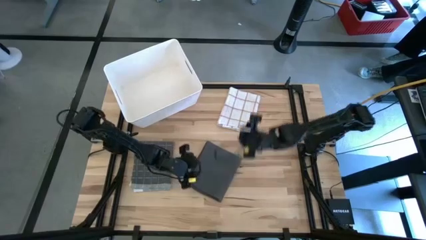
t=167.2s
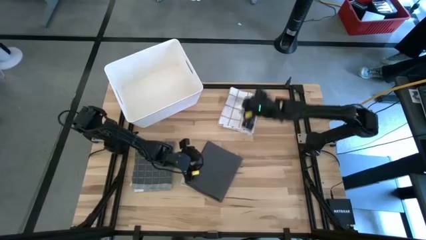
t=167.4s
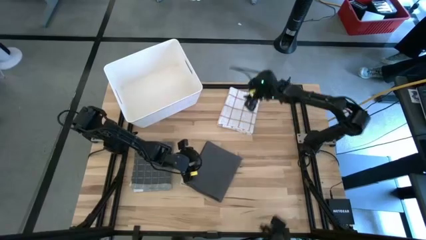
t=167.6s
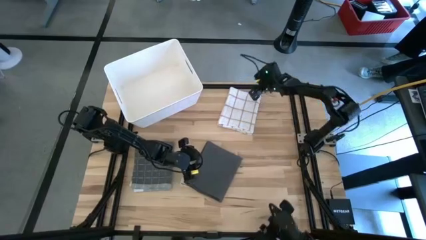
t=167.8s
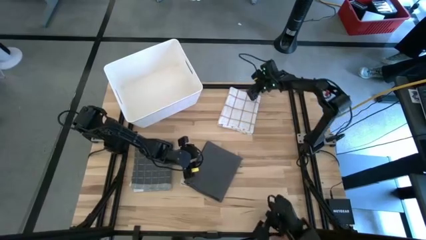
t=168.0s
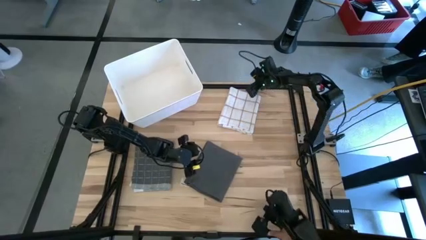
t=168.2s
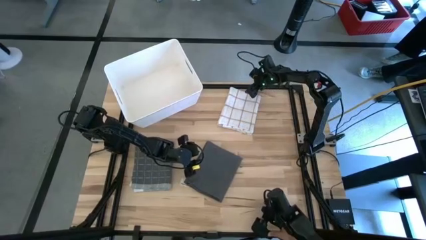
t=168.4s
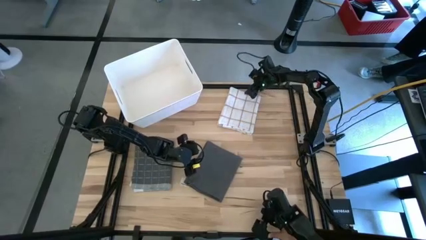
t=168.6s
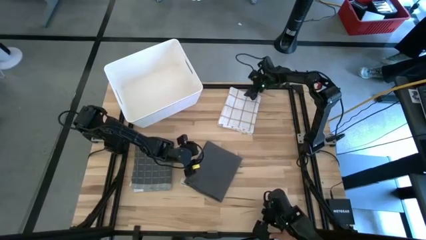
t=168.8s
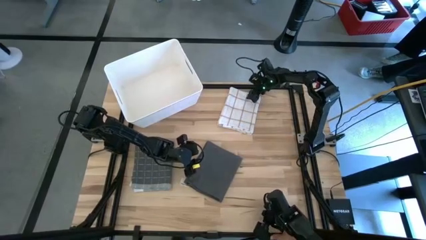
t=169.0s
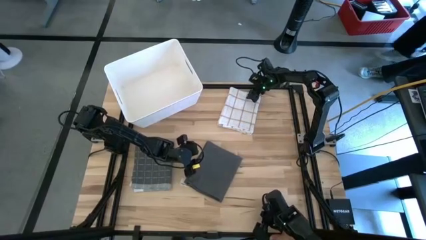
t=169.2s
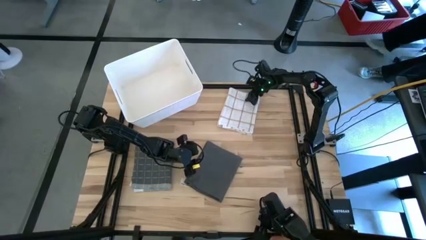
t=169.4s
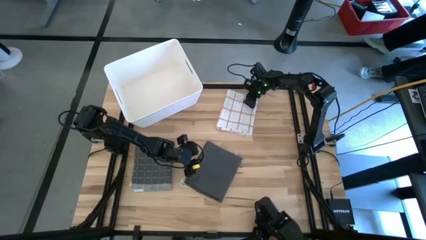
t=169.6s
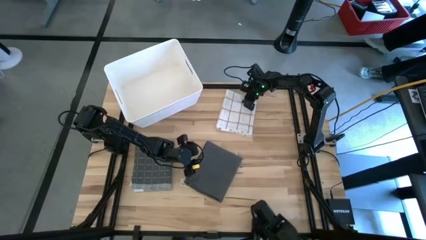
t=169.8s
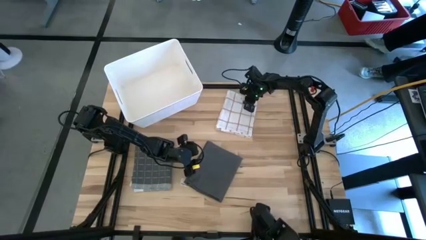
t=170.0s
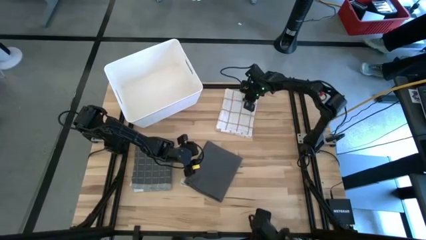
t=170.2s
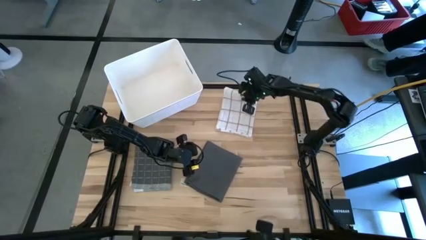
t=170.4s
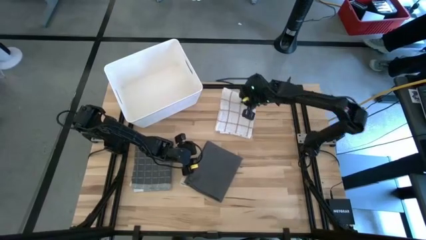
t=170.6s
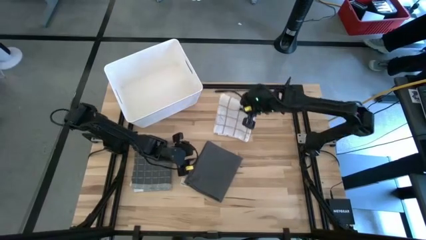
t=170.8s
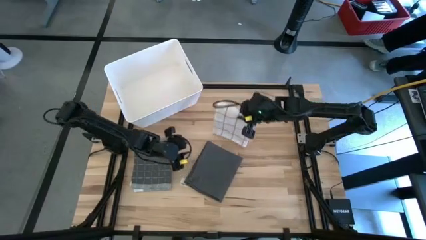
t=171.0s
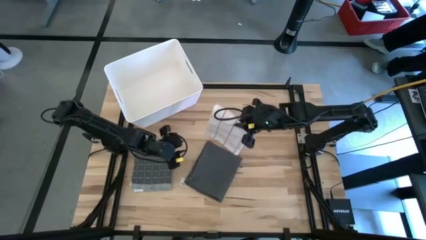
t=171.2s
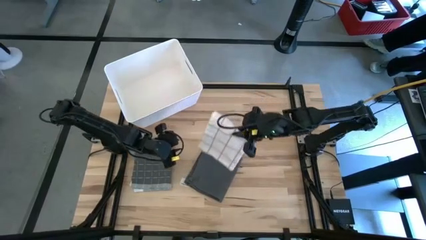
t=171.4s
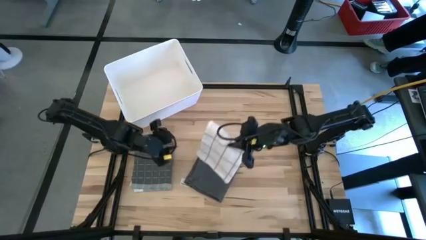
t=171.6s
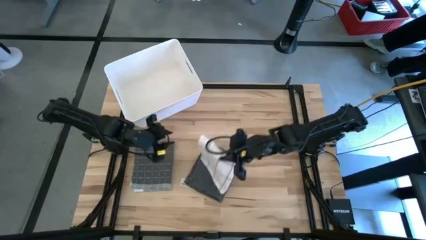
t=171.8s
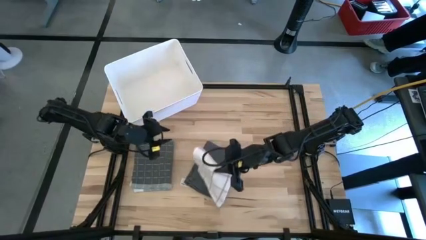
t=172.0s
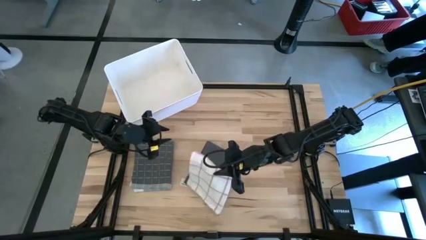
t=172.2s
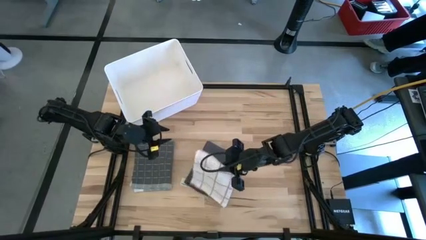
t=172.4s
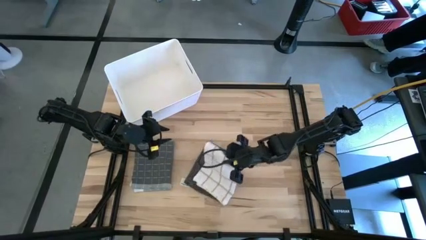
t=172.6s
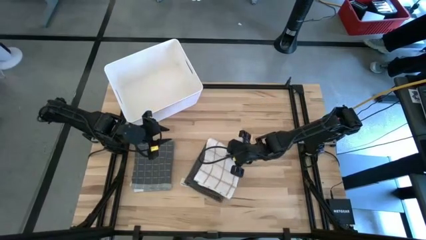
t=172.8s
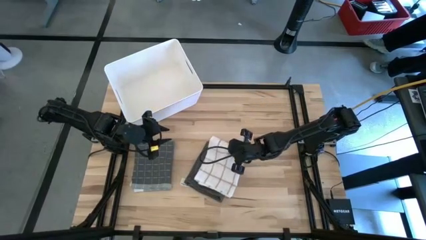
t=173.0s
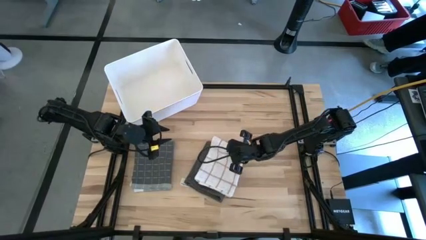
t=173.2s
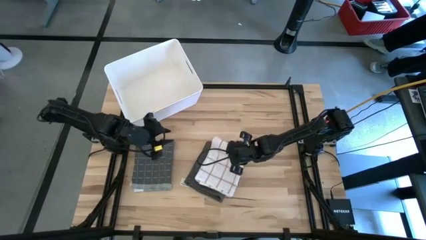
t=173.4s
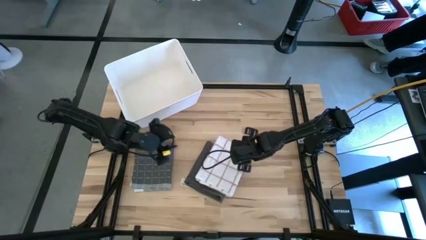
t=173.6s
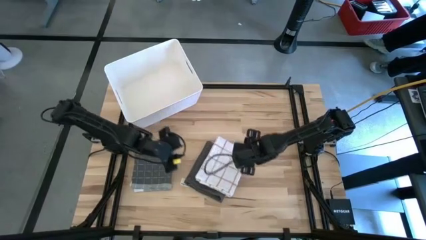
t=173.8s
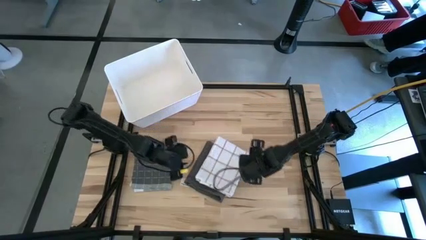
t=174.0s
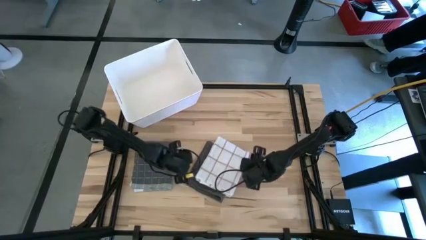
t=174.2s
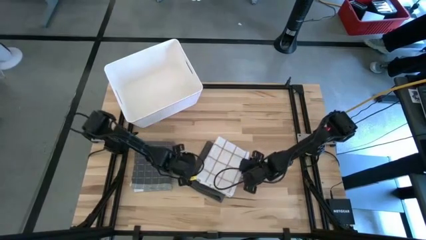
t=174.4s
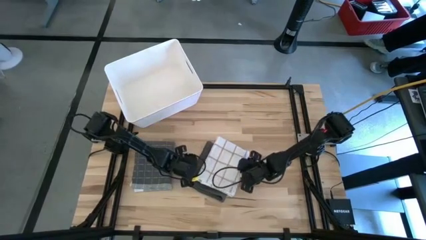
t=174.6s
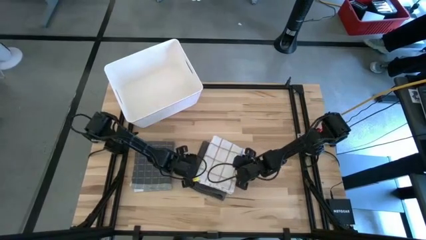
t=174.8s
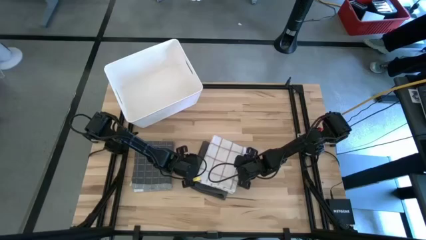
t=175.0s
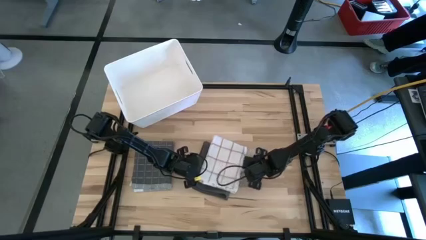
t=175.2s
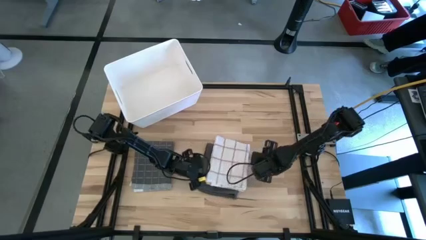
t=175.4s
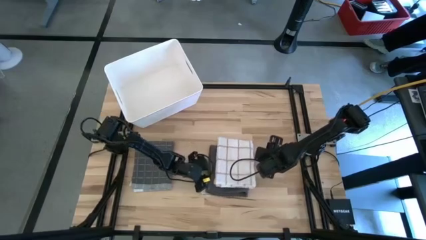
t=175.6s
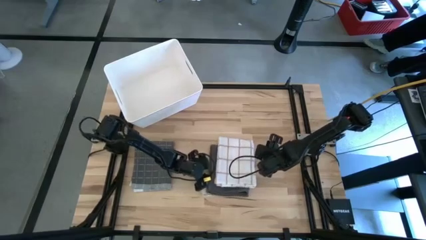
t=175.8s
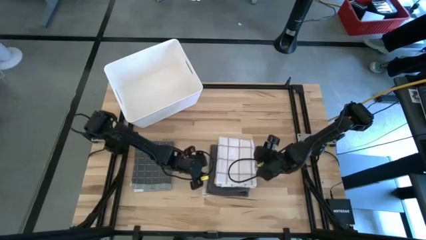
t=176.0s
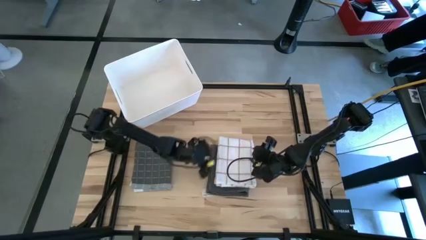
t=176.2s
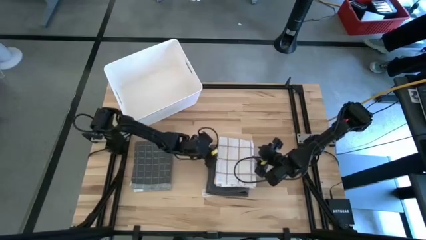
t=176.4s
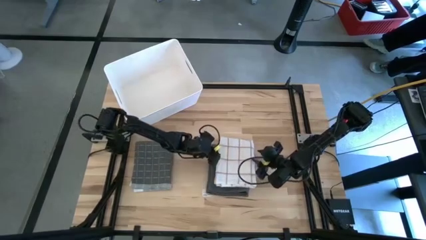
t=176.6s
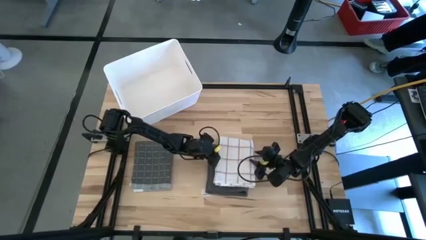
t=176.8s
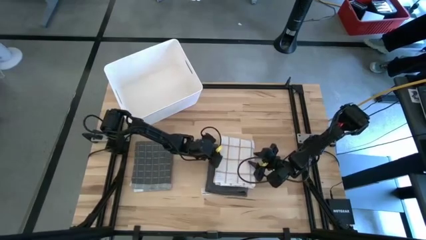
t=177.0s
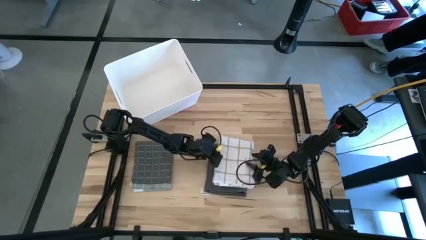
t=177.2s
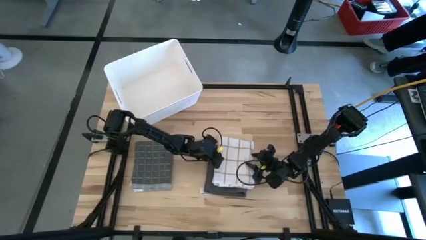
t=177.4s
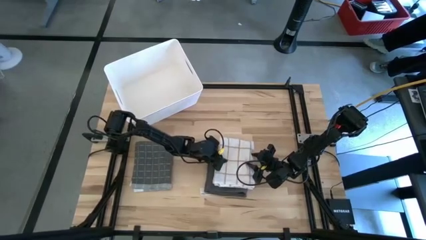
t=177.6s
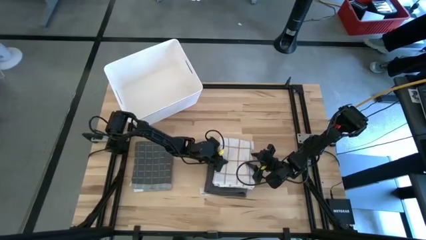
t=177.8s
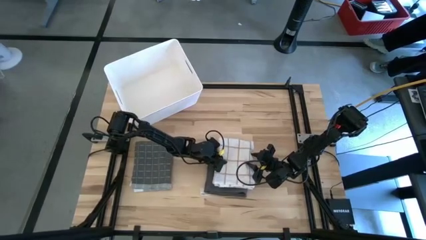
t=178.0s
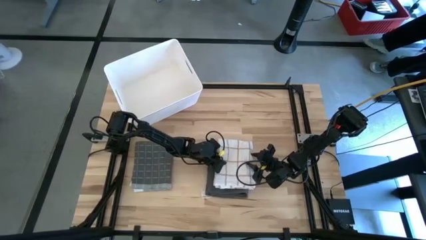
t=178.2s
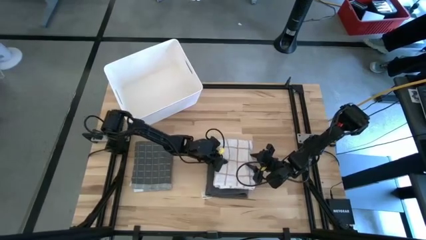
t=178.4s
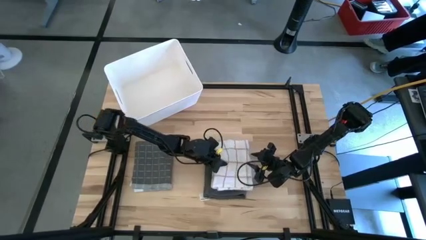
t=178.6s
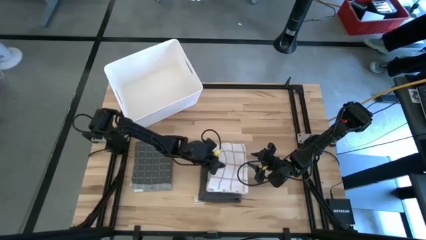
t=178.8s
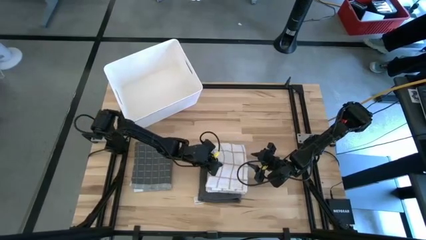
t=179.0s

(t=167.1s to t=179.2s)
Task: Fold towel
Stack the folded brown-white towel on top of the folded gray towel

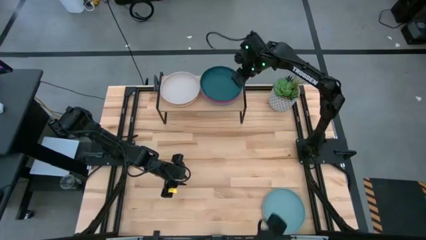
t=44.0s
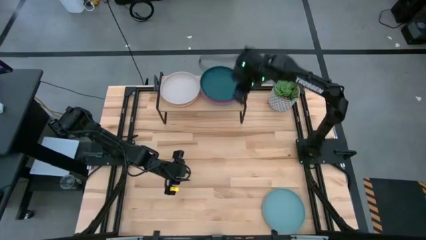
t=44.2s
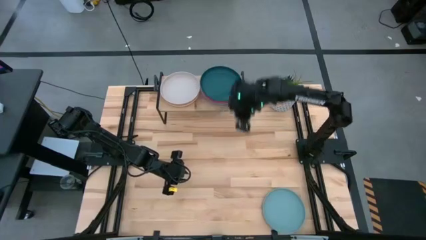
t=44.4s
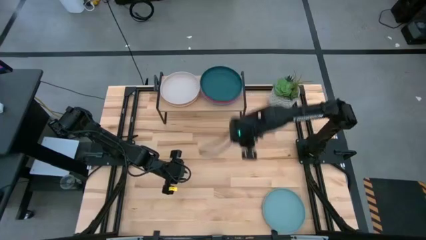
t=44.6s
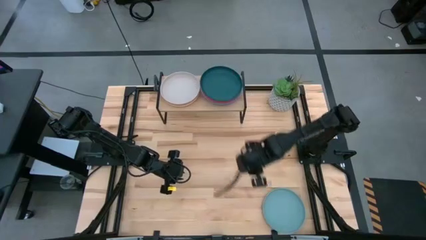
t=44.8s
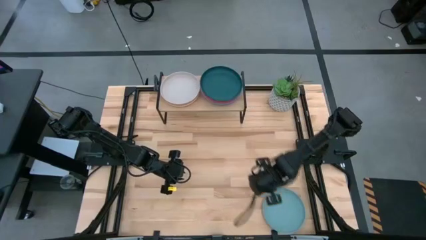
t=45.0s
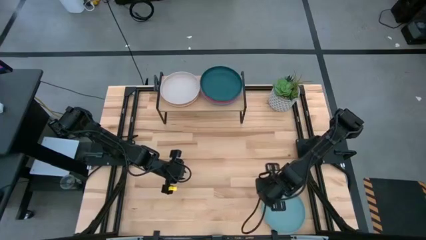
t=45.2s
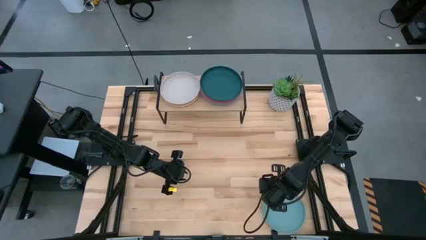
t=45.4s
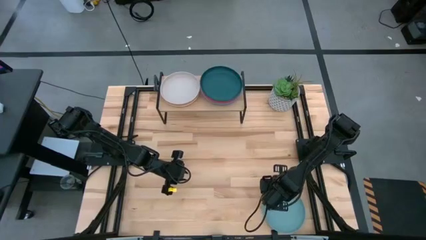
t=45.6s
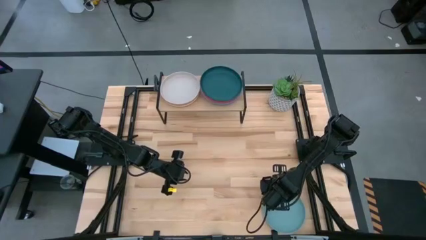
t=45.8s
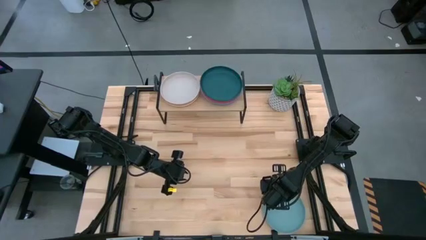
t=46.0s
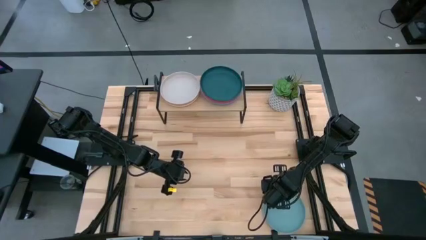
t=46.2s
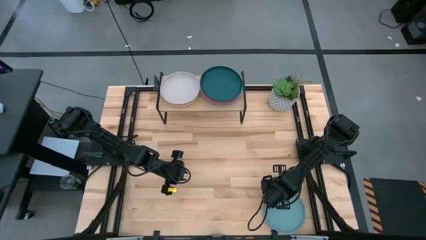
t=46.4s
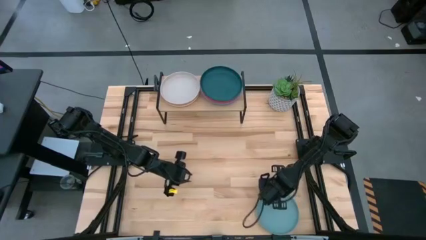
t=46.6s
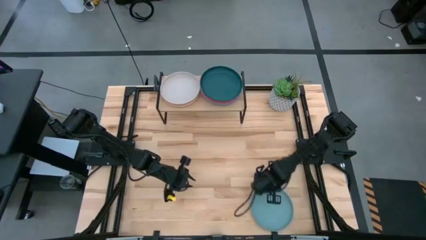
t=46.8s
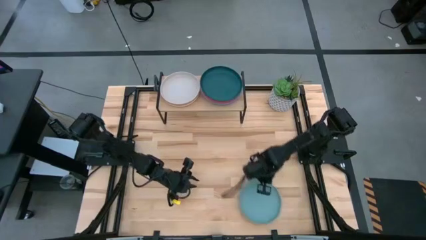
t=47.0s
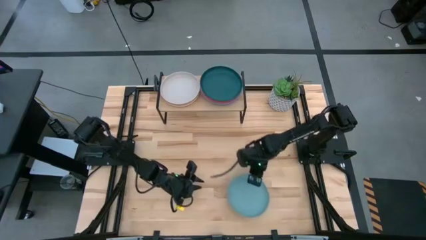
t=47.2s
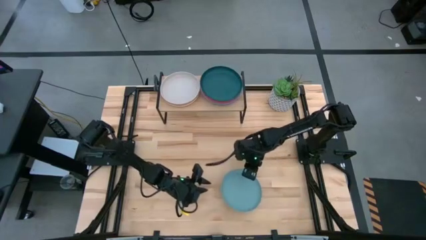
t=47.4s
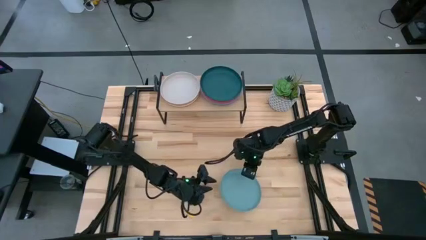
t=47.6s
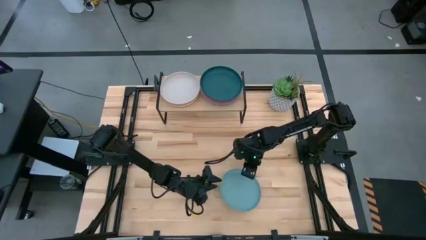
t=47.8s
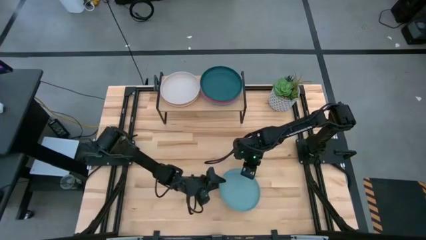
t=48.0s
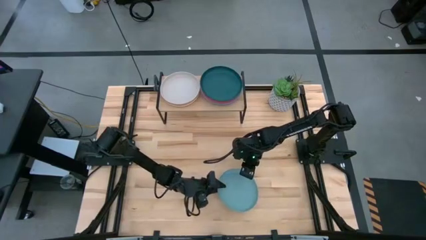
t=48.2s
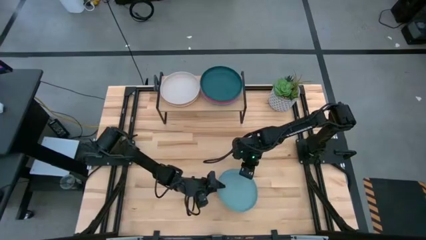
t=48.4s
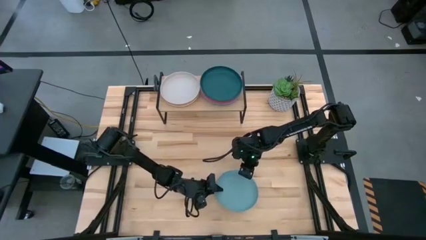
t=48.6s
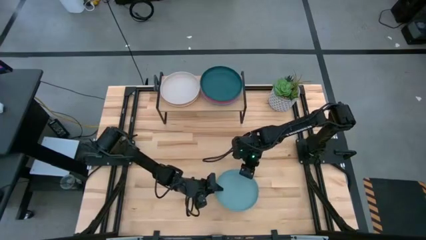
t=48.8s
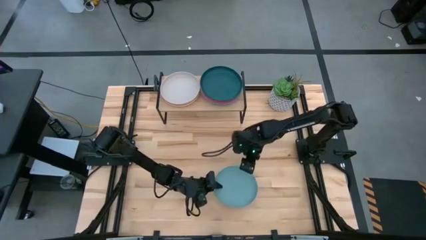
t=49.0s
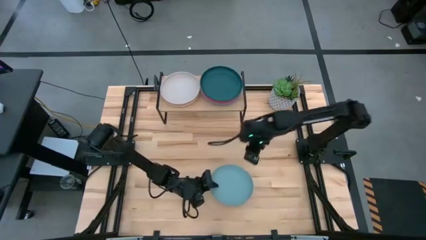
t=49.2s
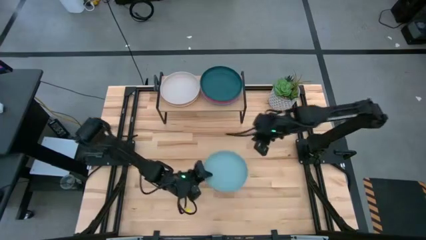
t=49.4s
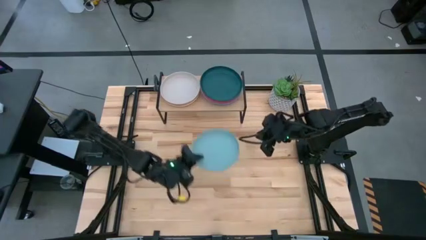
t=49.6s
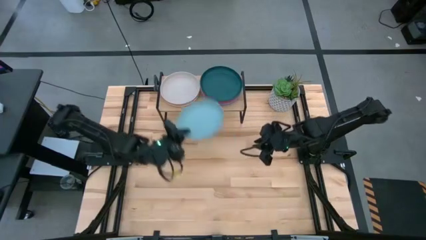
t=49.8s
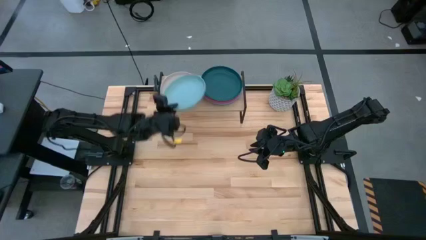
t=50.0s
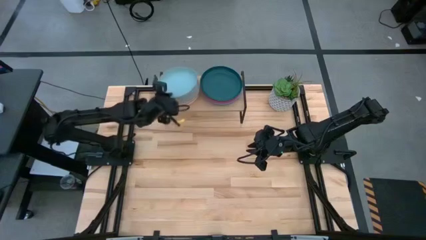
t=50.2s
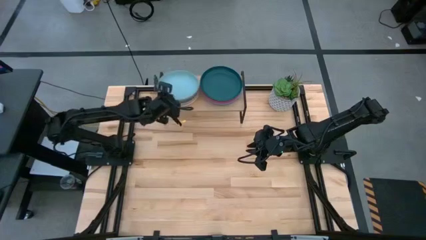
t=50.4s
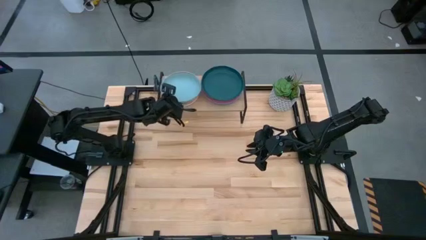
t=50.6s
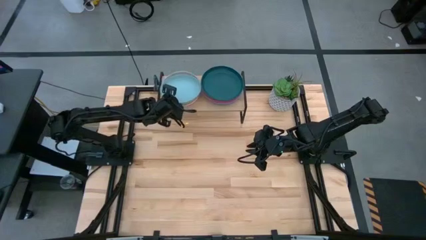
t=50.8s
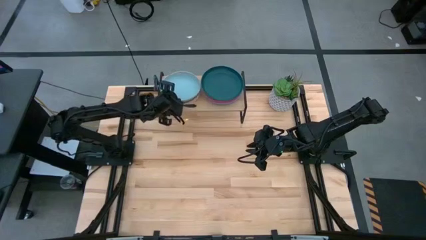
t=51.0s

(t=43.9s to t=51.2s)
Task: Place and stack plates onto a shelf
Stack the light blue plate on top of the gray plate on the shelf
